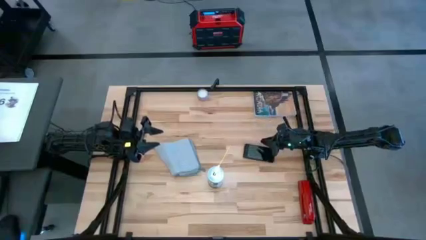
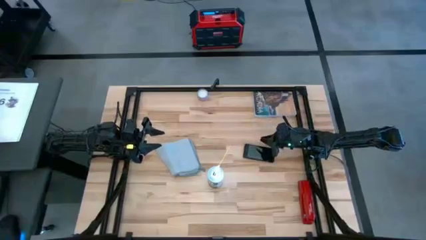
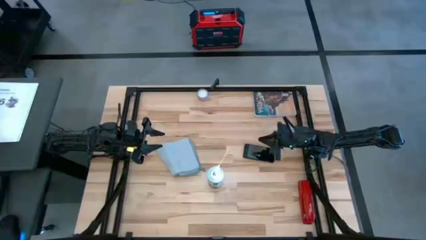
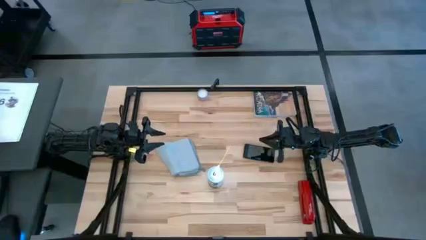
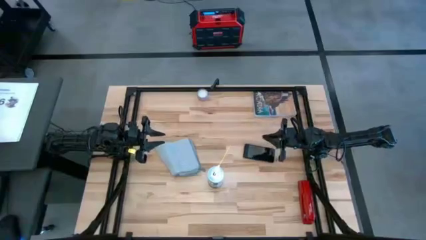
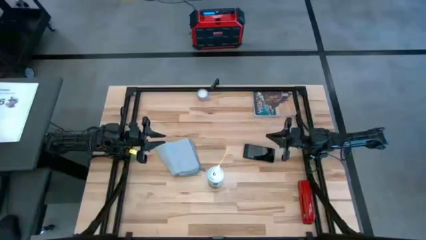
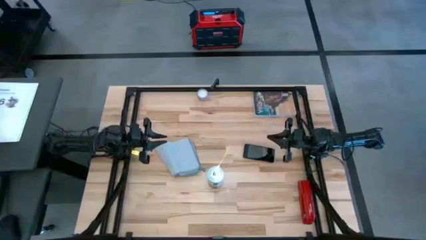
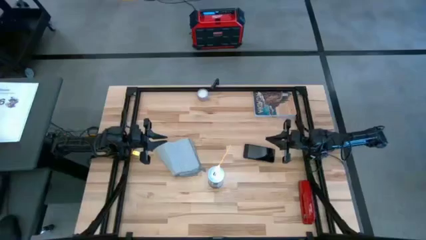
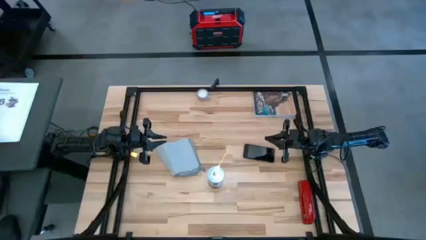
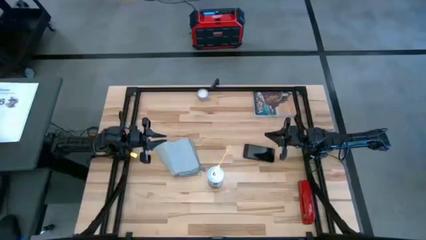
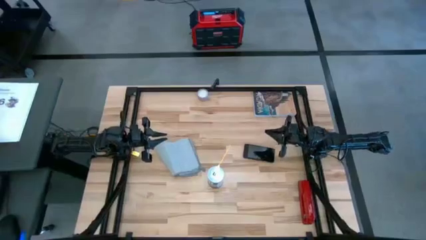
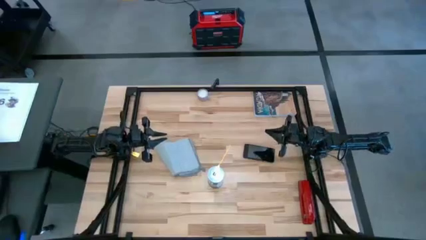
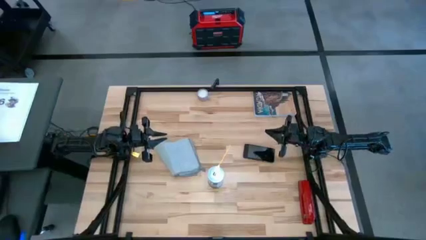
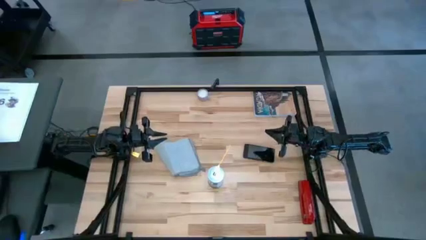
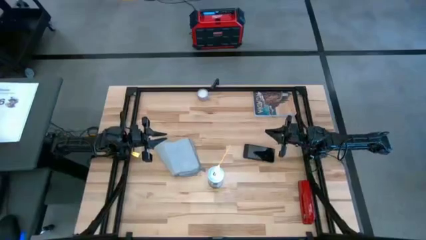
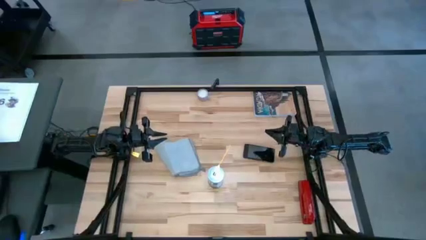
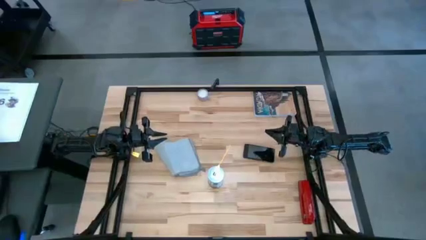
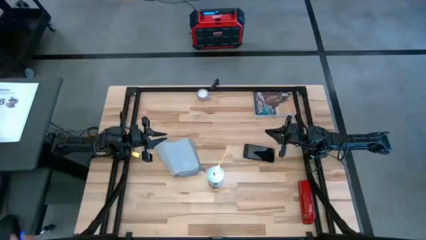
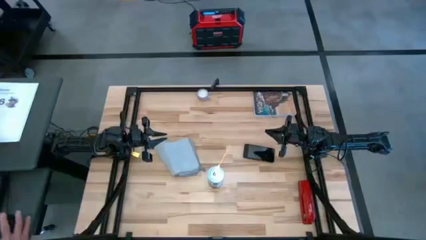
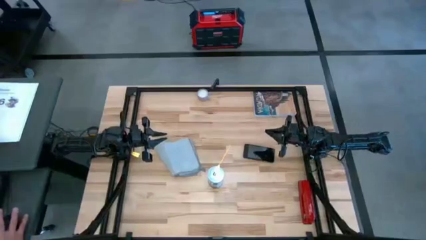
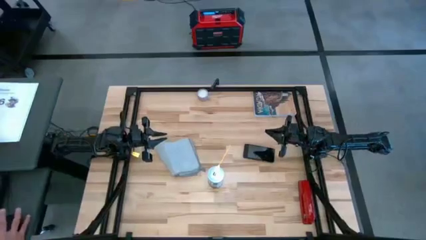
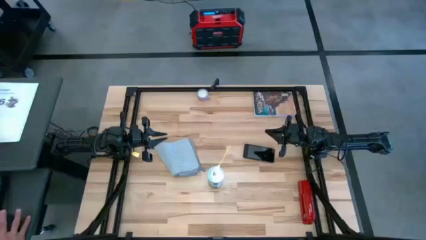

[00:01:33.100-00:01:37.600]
Task: Apply microfiber cloth
Return to Home Position

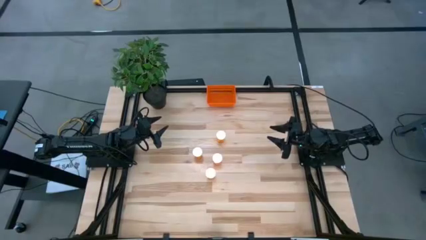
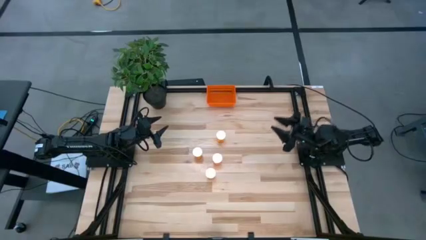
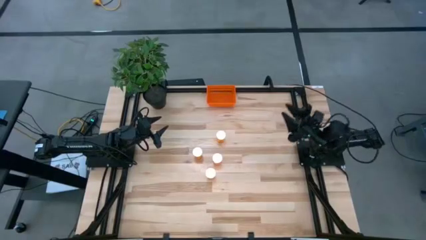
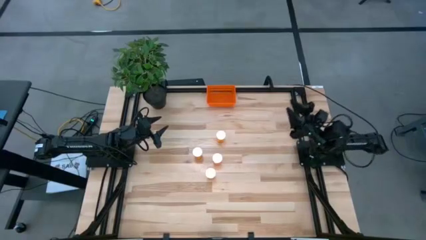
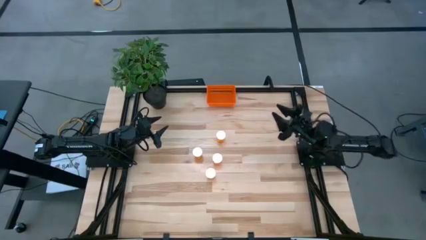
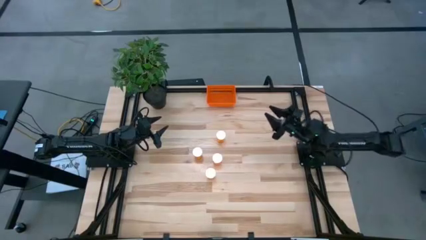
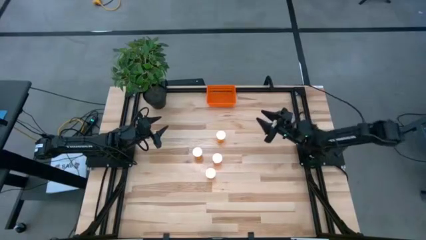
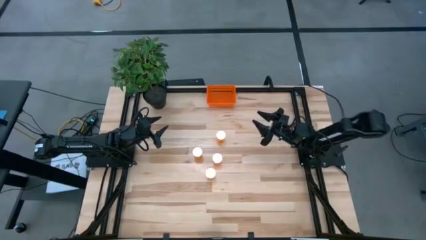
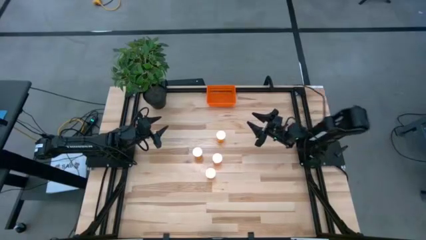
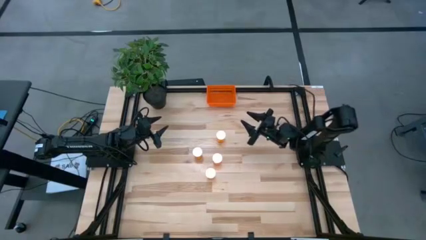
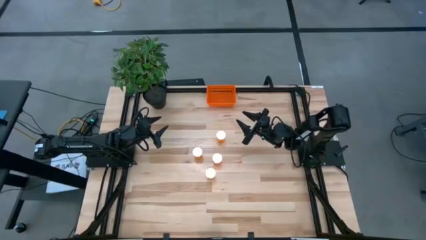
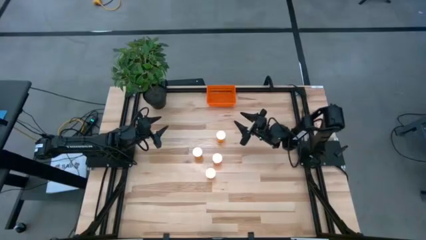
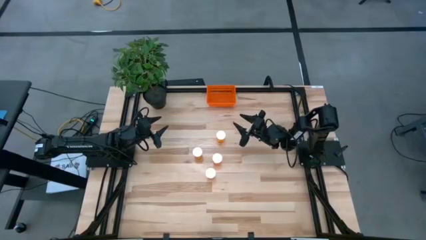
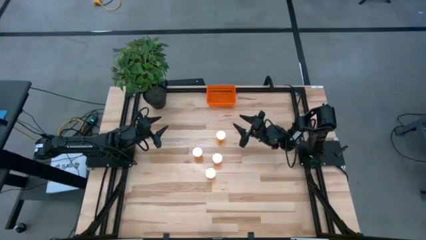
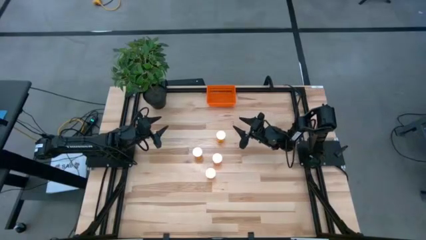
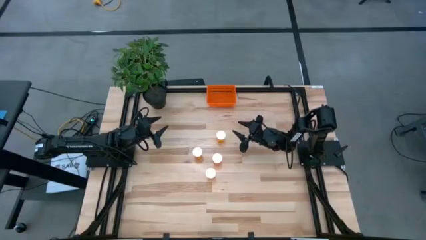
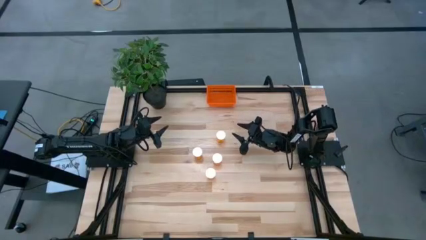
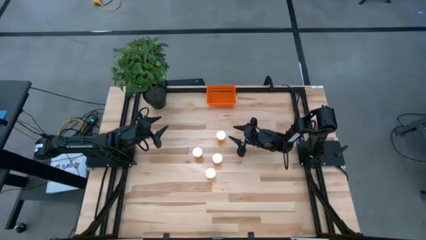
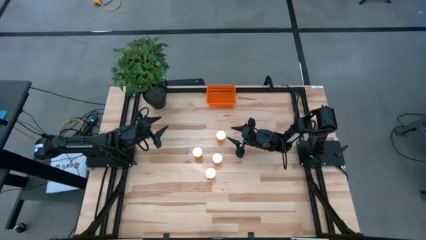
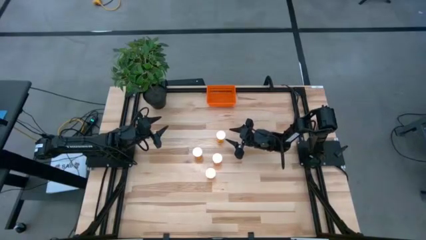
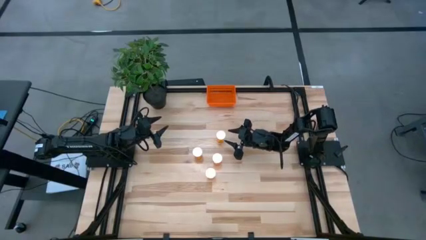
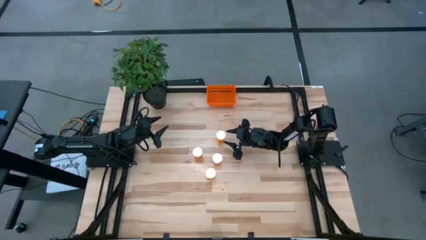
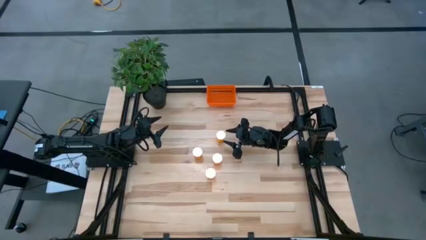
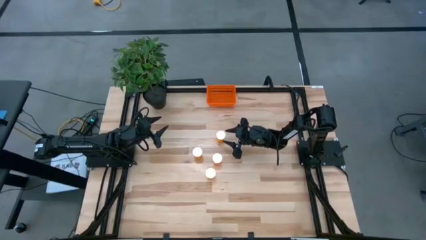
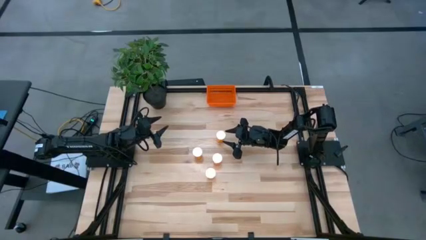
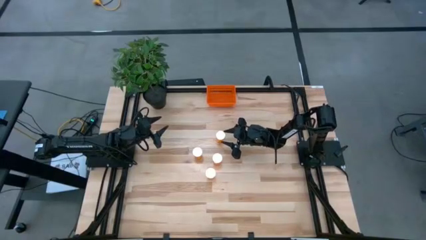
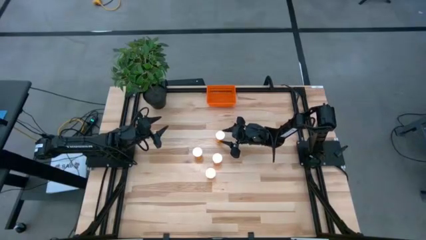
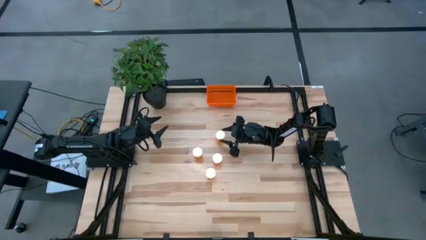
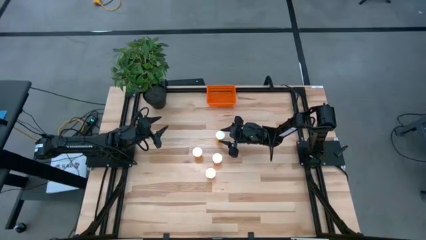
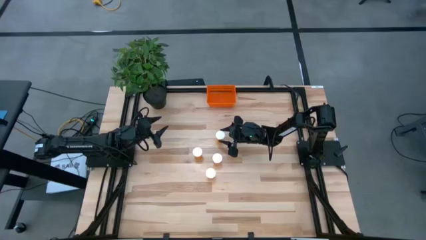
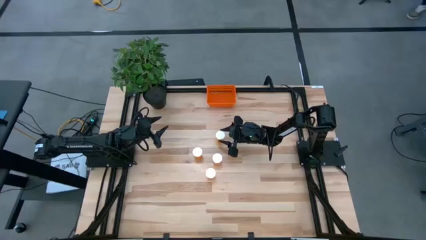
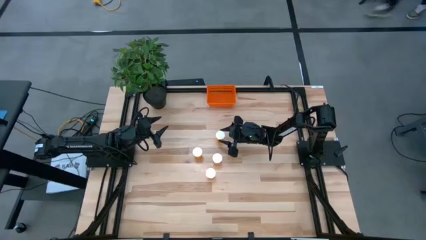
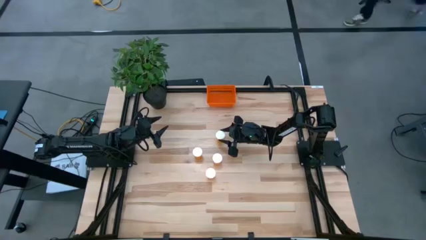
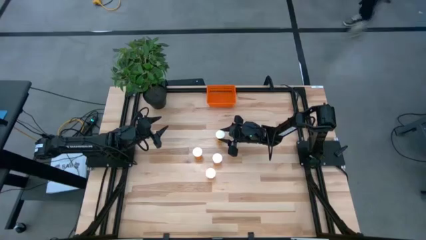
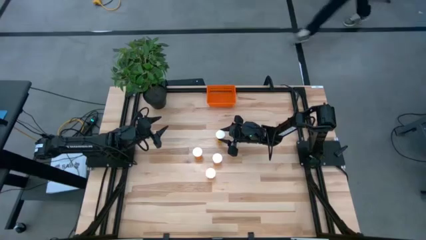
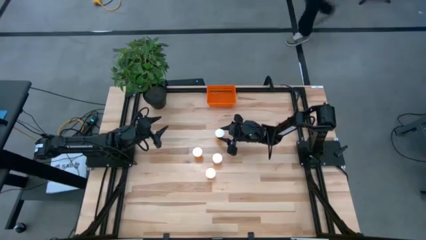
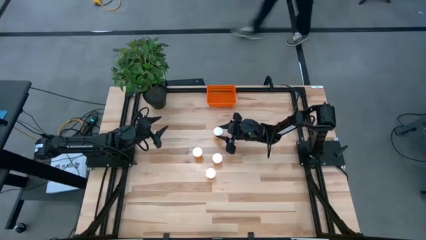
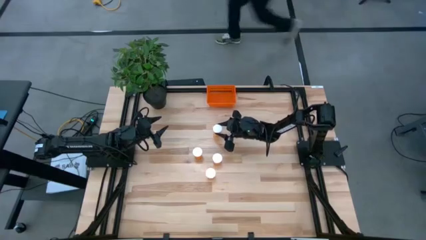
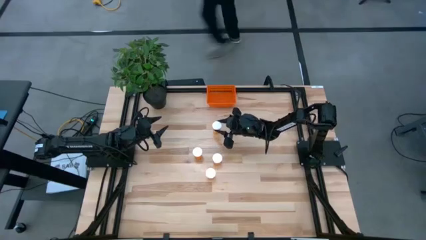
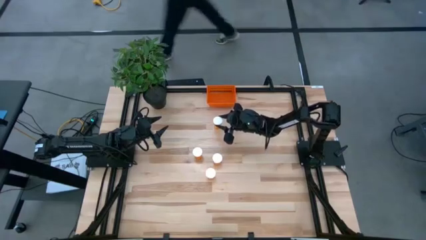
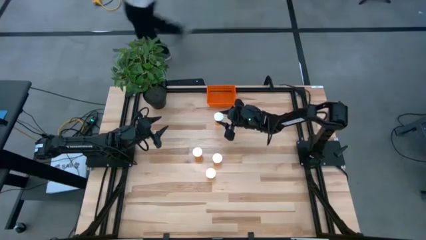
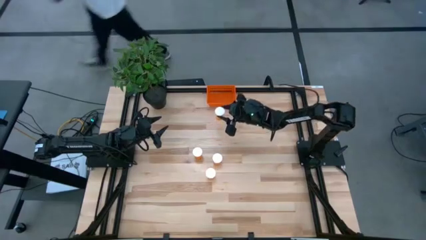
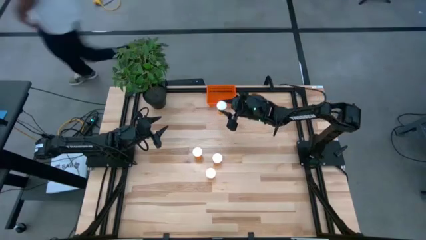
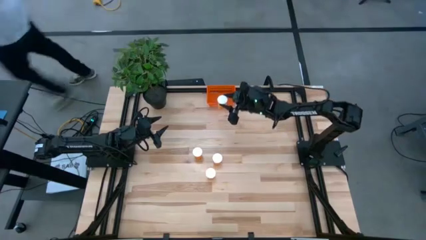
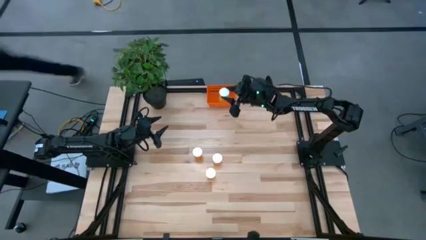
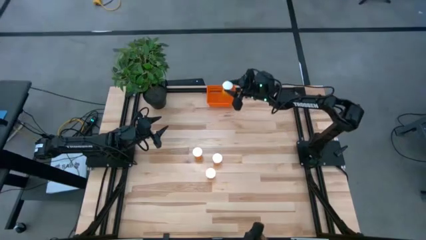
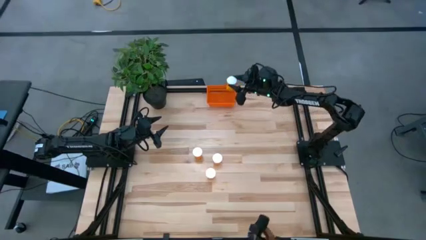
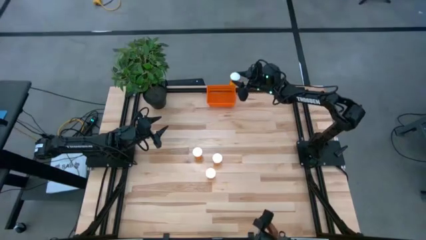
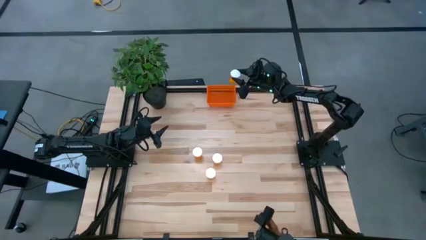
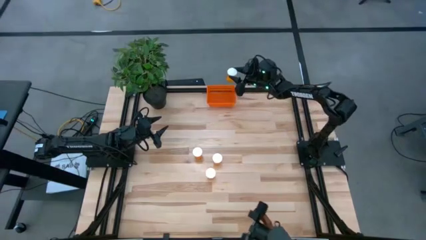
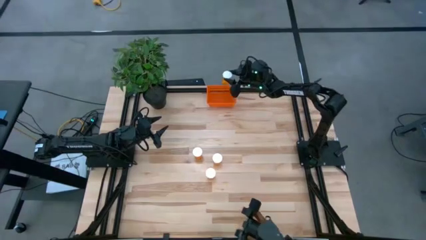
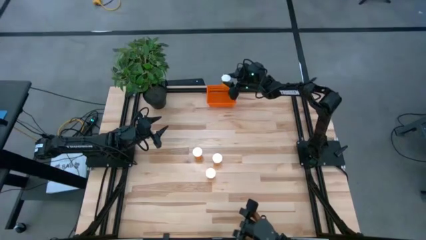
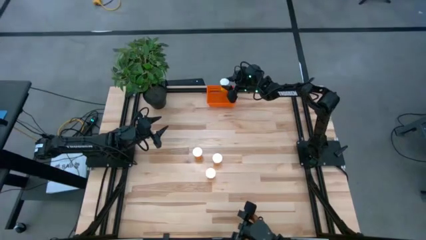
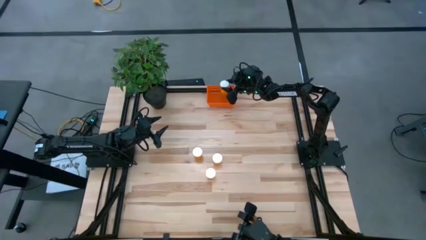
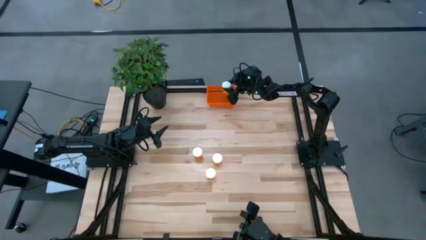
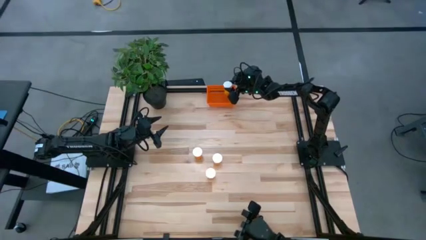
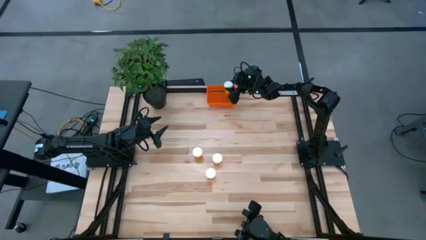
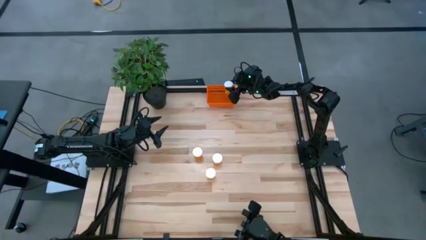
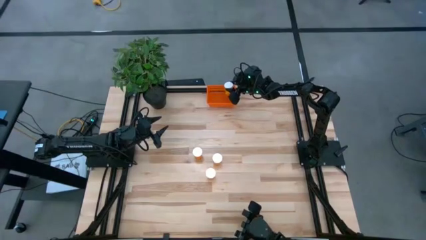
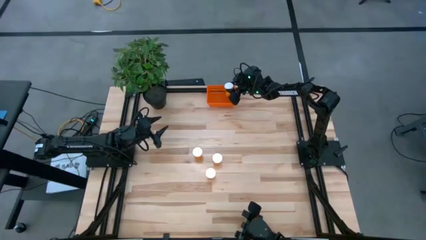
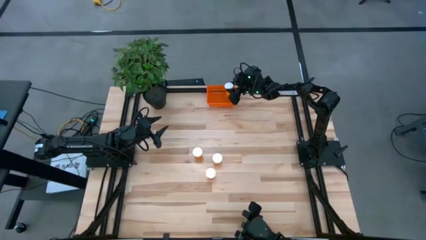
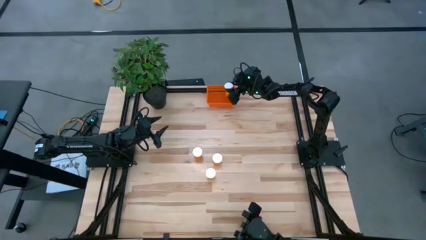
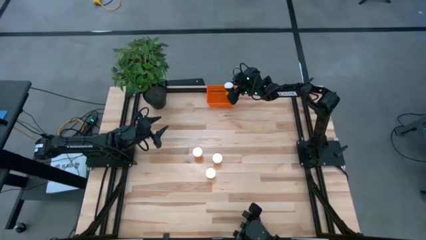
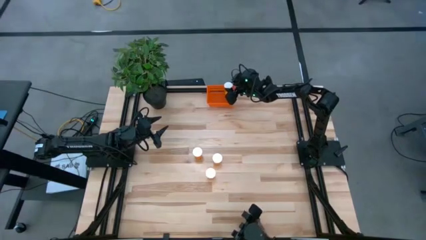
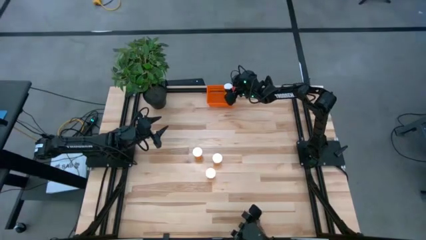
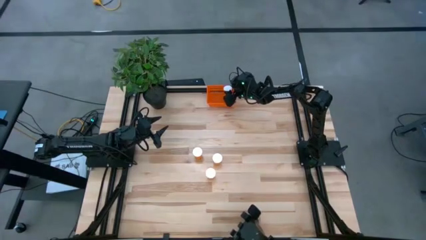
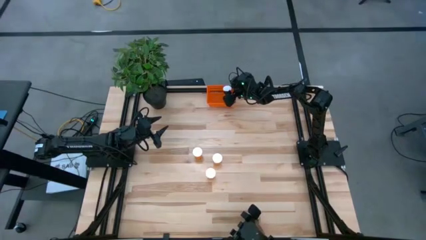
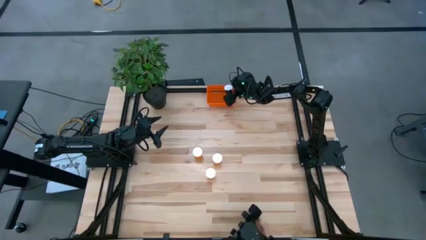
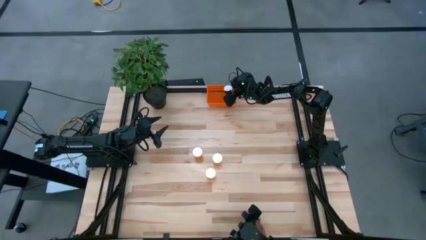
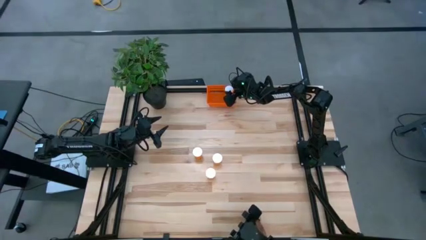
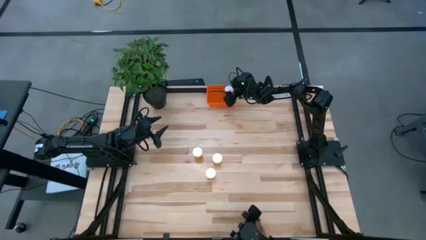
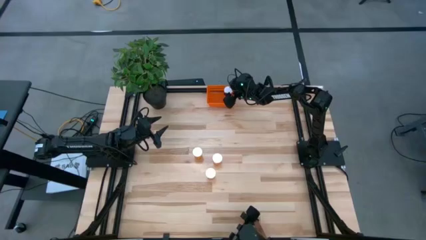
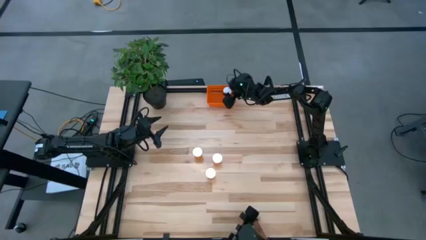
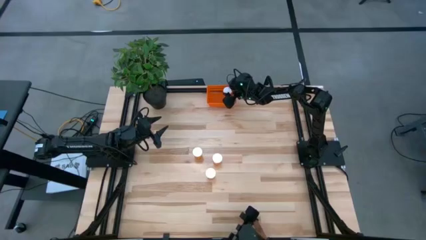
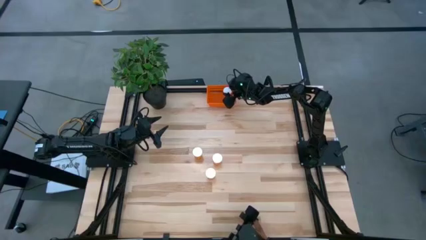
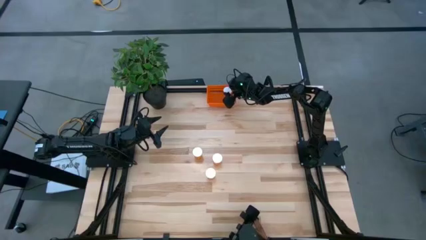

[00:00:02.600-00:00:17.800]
Task: Pick and place pill bottles into a basket
Put the orange pill bottle into the orange bin
